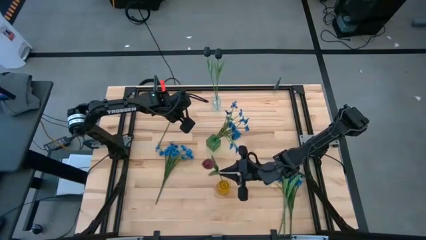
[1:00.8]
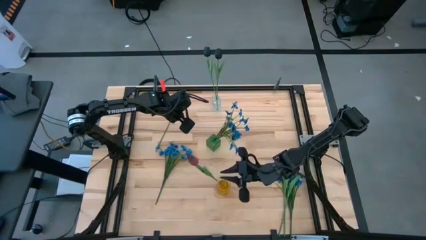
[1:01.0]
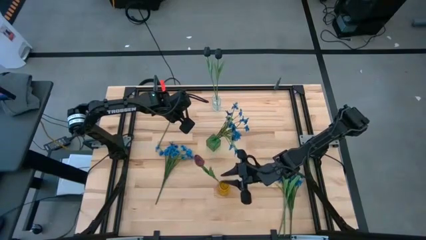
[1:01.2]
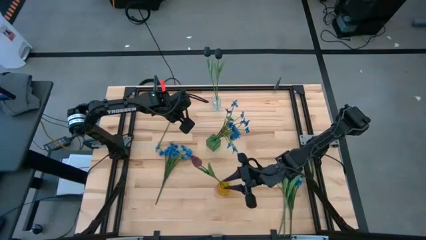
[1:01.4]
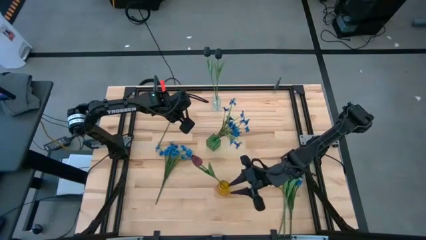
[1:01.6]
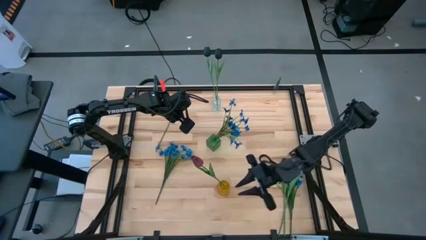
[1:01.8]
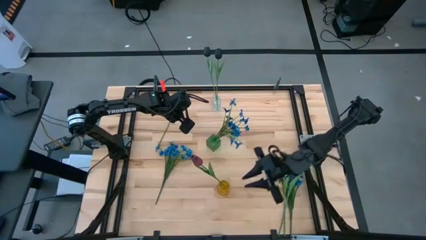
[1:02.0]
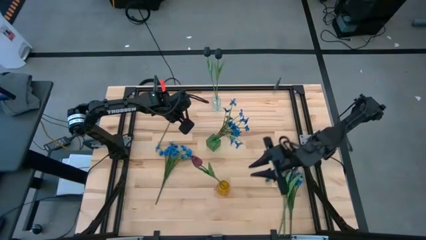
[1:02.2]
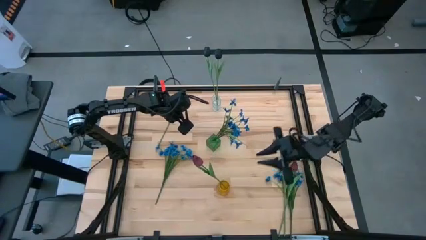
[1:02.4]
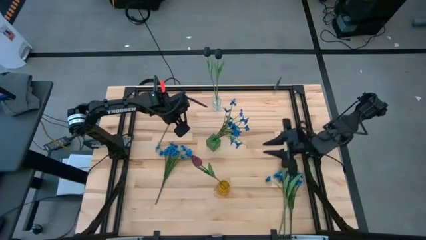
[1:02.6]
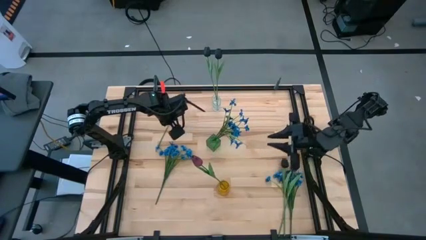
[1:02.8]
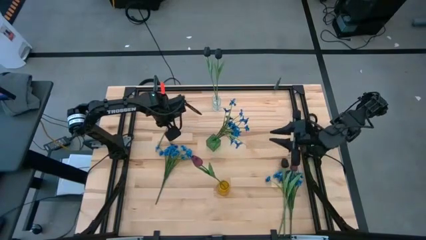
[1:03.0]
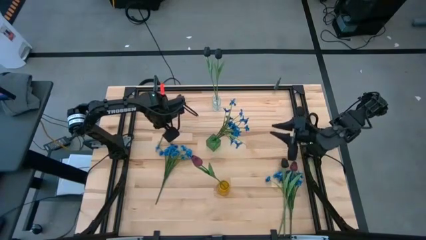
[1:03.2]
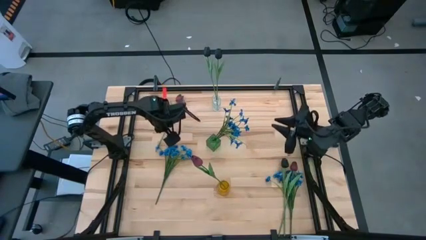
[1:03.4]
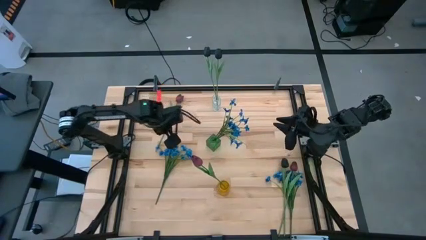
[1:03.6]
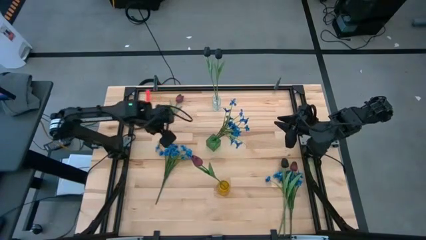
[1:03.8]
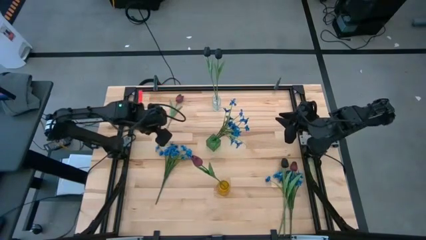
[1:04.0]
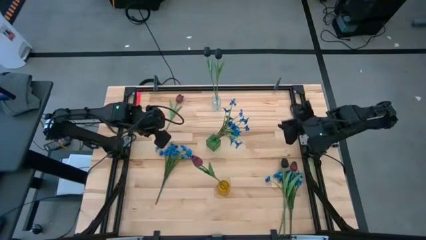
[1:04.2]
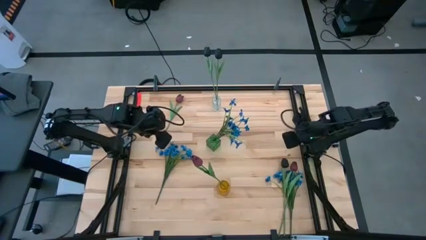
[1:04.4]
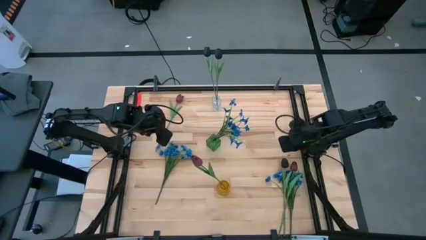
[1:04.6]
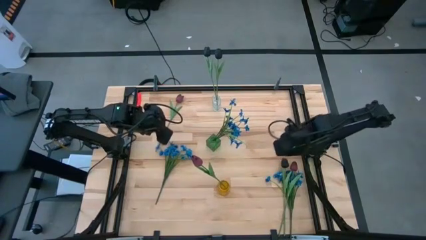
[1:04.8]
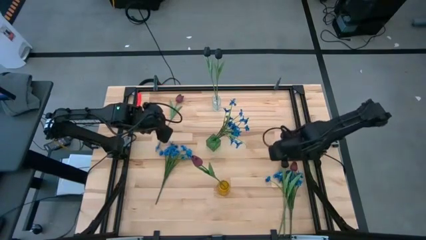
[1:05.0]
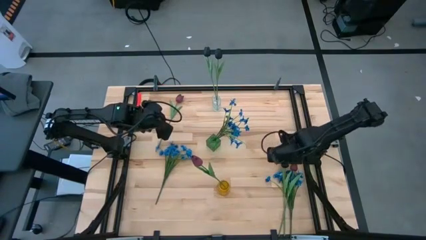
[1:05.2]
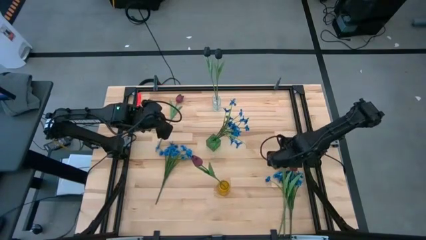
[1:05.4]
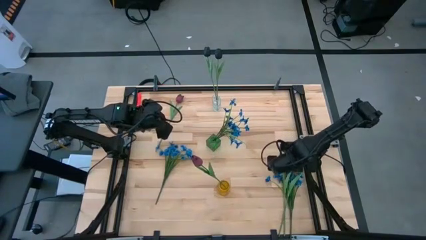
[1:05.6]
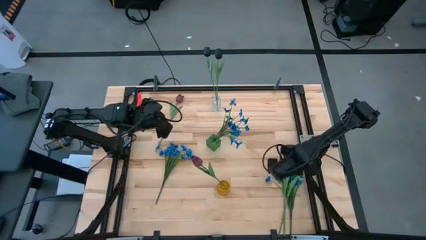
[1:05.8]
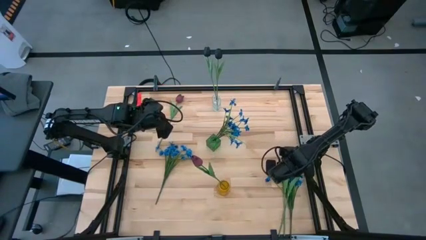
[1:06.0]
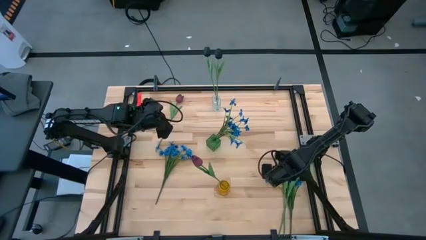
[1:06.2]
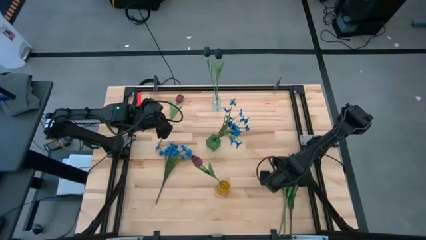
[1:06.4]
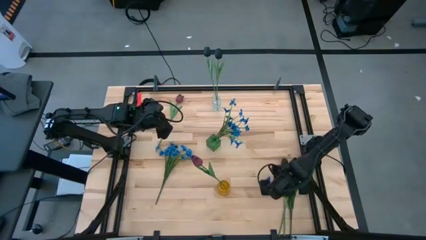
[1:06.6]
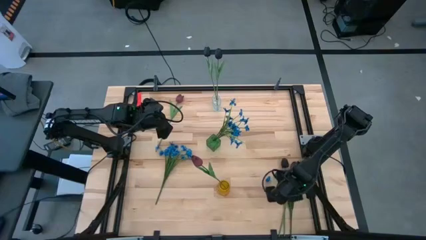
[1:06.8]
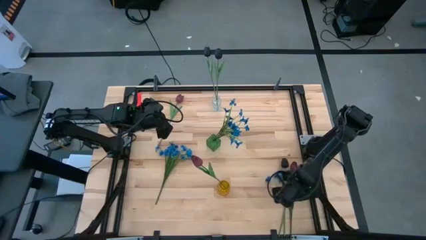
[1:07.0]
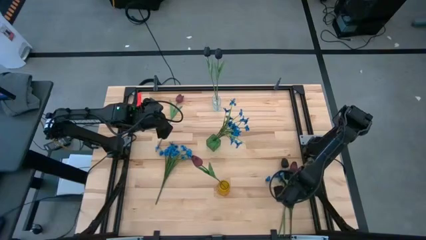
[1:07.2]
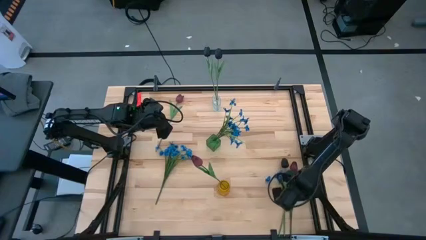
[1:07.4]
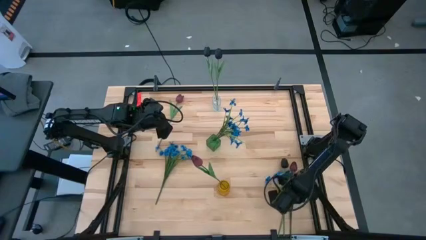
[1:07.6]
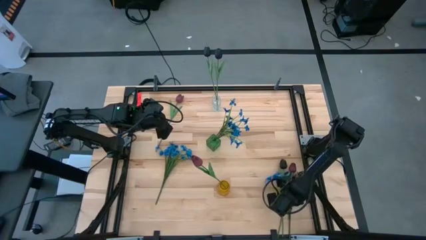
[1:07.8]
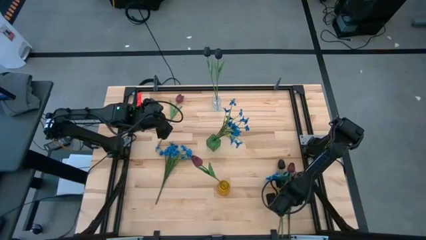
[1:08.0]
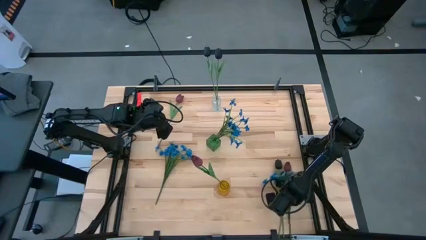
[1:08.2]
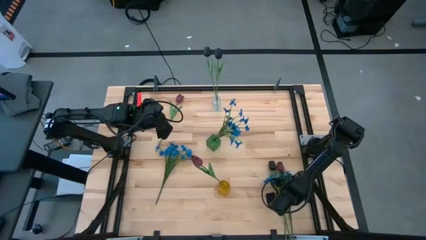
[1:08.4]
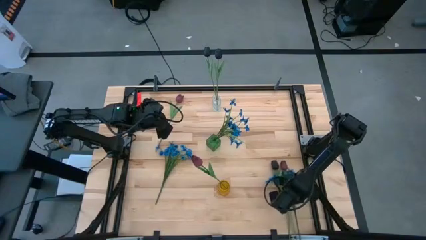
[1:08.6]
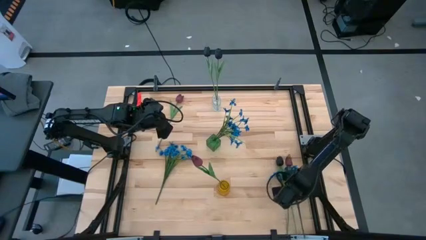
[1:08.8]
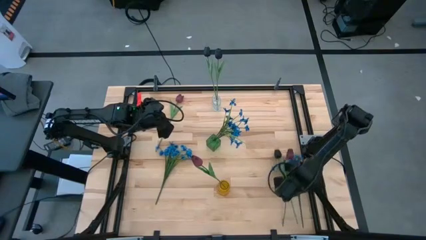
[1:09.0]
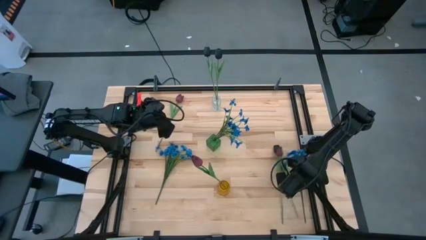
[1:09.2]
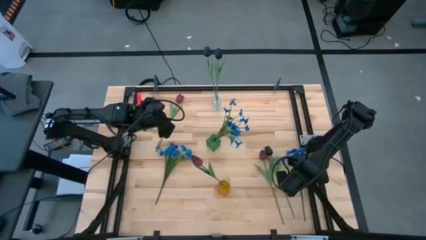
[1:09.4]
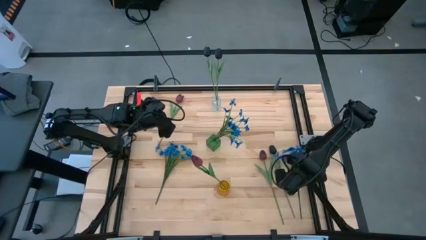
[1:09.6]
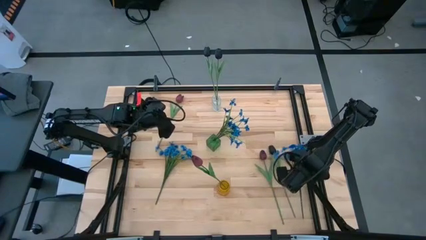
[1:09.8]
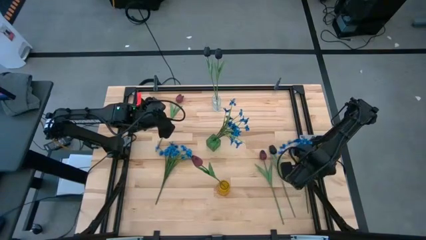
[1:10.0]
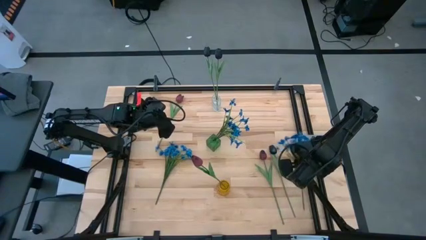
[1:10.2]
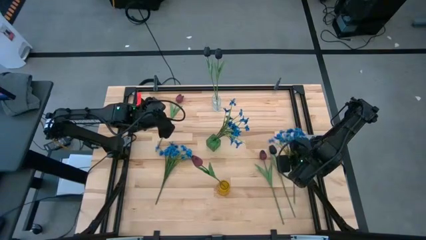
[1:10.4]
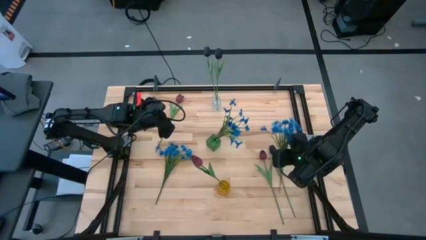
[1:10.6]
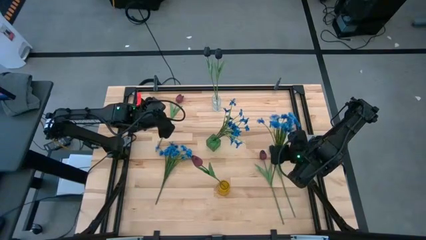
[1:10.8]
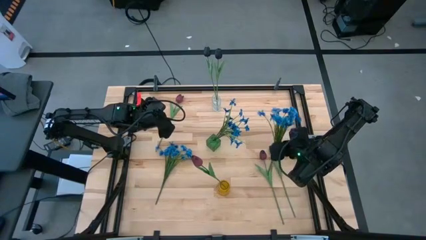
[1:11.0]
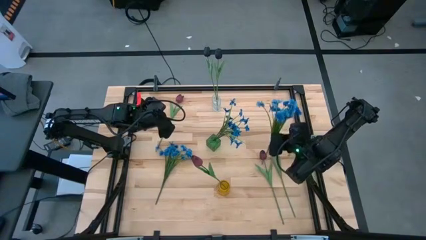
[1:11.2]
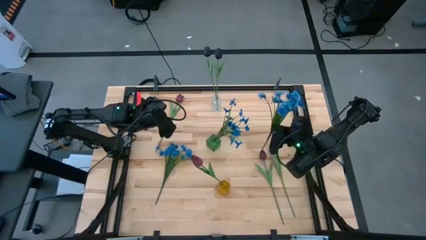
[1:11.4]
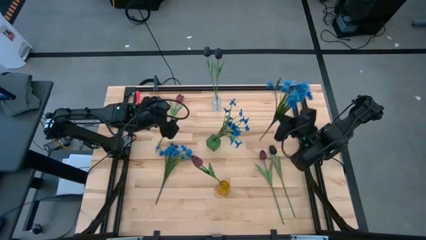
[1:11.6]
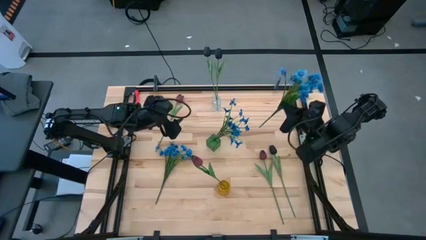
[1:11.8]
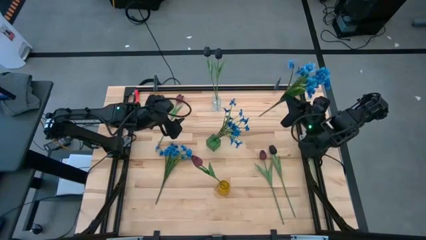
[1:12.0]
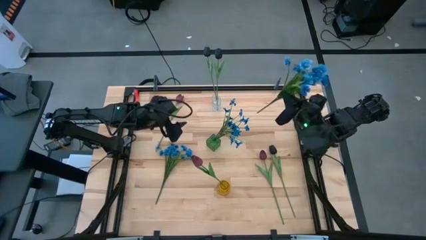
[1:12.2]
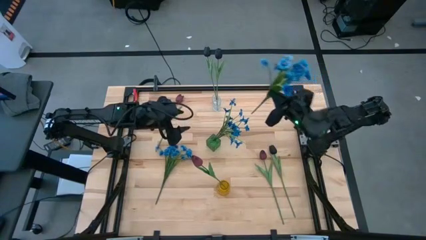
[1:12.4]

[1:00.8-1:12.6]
Task: Sort flowers into vase by color
Put the right blue flowers into the green vase
